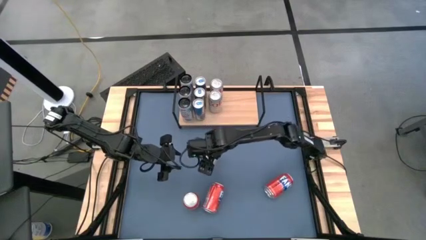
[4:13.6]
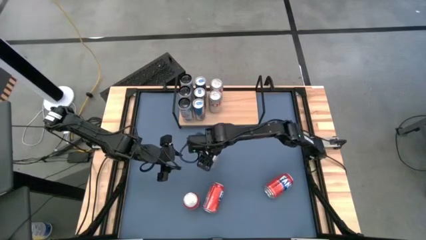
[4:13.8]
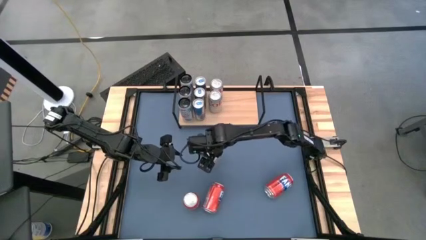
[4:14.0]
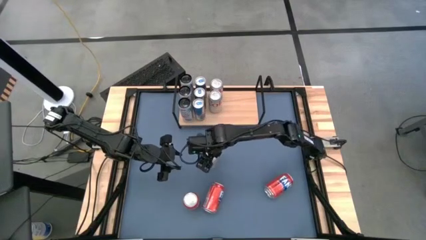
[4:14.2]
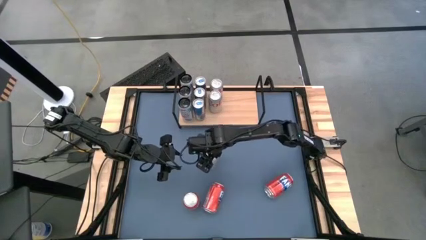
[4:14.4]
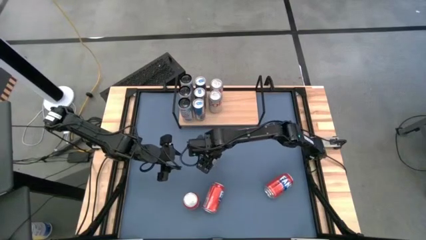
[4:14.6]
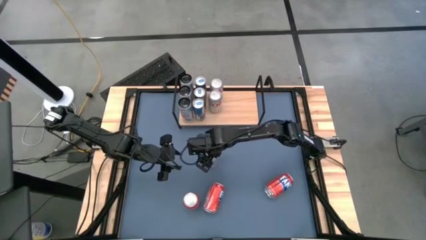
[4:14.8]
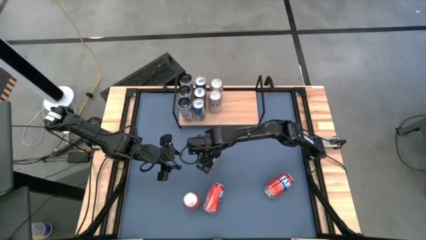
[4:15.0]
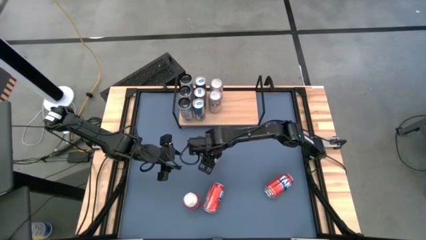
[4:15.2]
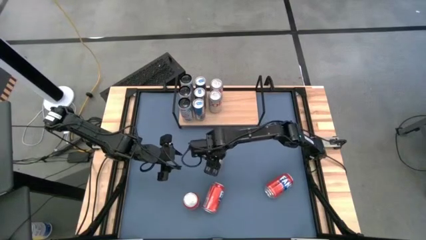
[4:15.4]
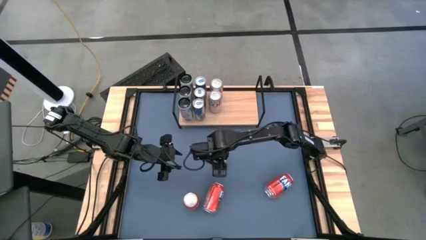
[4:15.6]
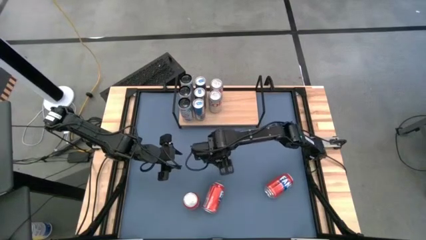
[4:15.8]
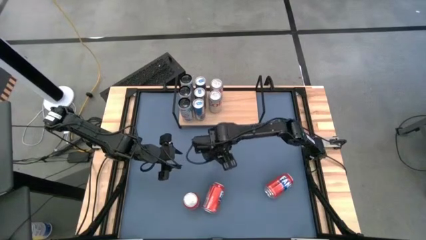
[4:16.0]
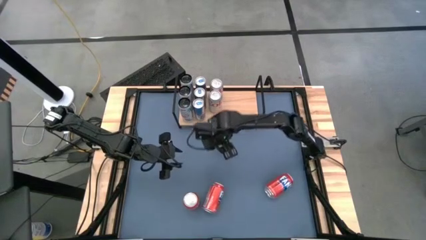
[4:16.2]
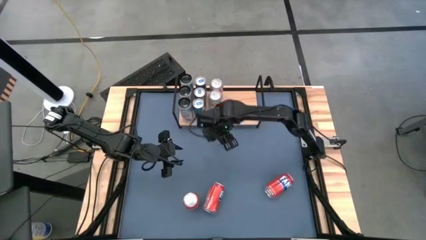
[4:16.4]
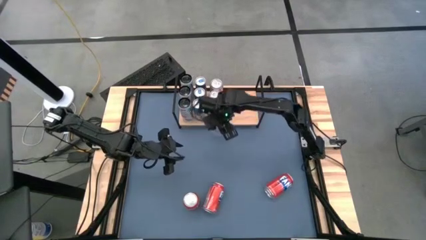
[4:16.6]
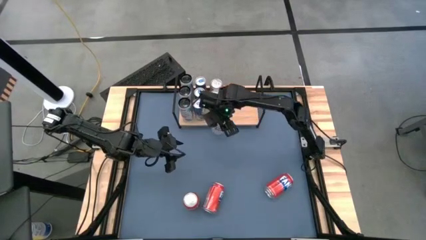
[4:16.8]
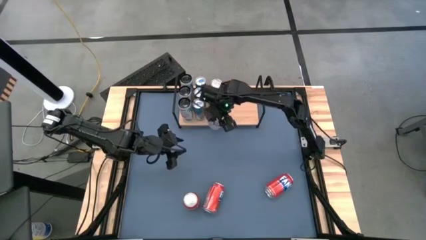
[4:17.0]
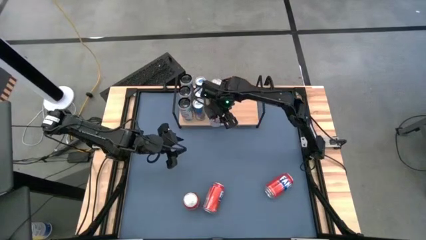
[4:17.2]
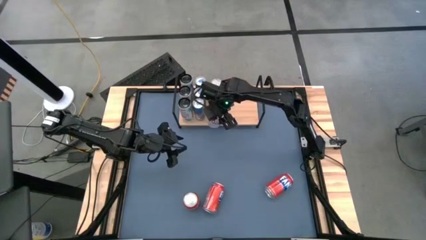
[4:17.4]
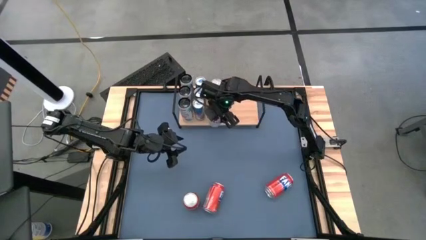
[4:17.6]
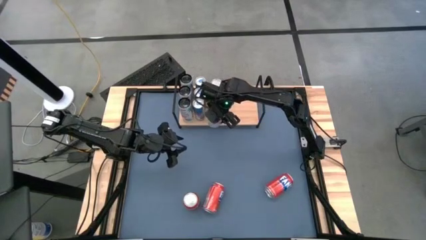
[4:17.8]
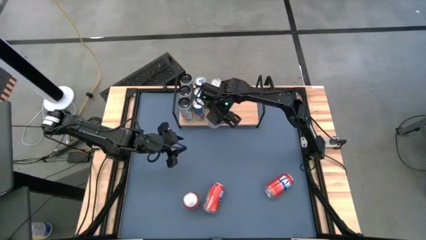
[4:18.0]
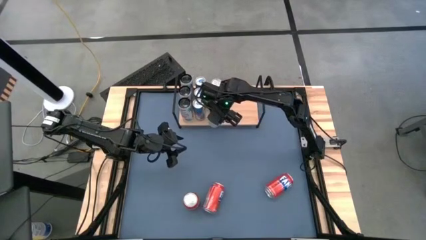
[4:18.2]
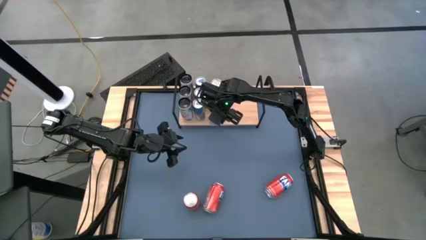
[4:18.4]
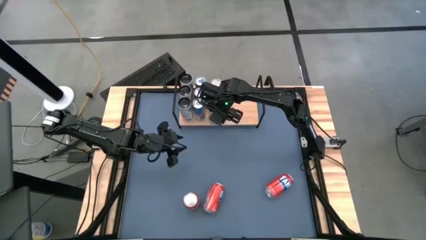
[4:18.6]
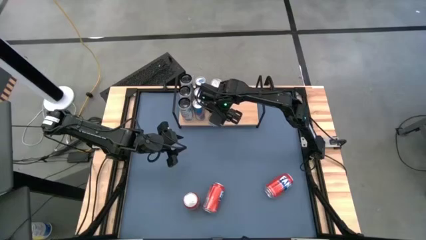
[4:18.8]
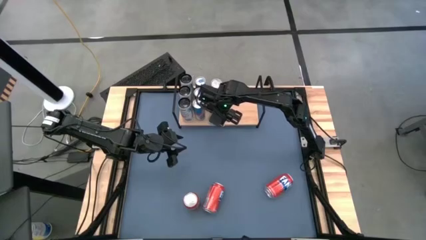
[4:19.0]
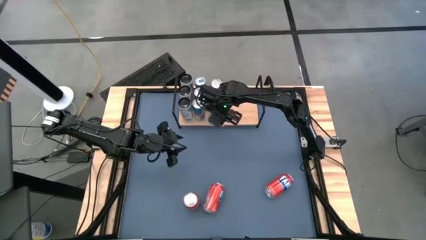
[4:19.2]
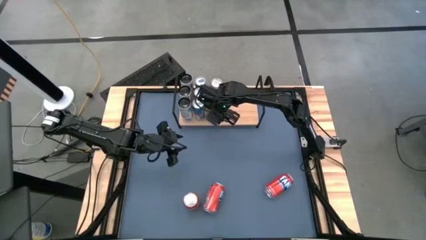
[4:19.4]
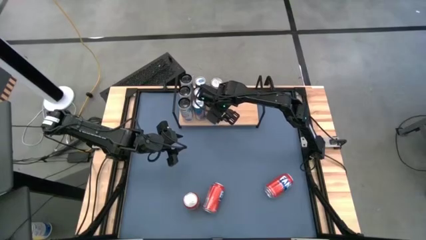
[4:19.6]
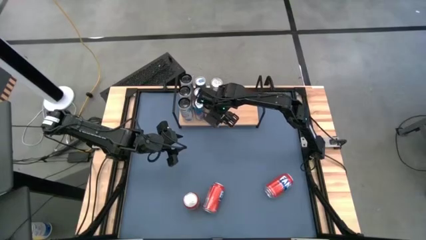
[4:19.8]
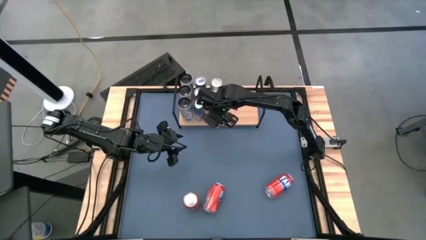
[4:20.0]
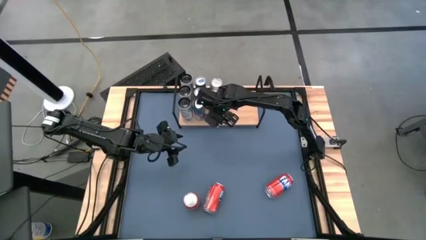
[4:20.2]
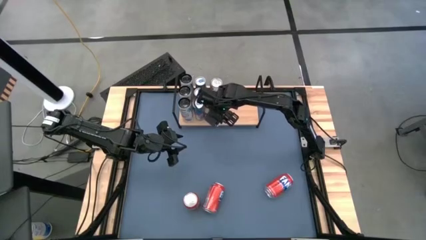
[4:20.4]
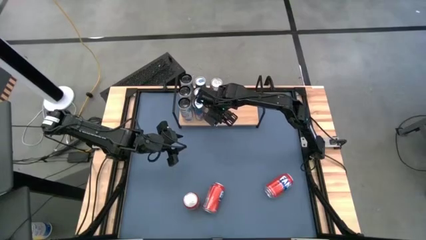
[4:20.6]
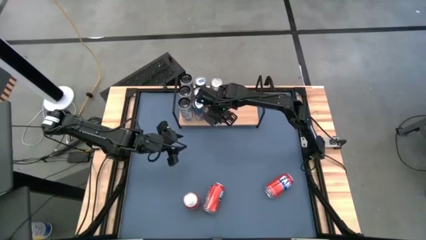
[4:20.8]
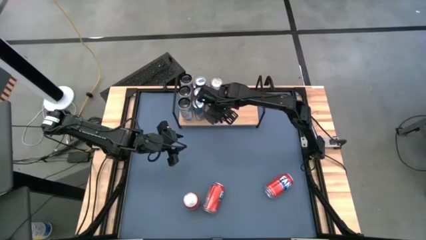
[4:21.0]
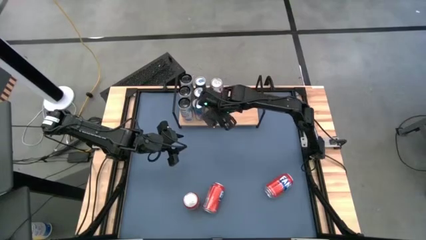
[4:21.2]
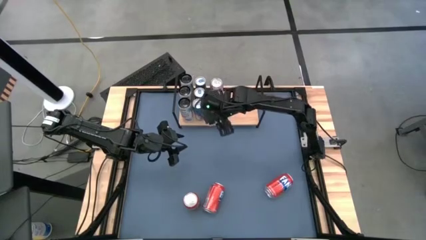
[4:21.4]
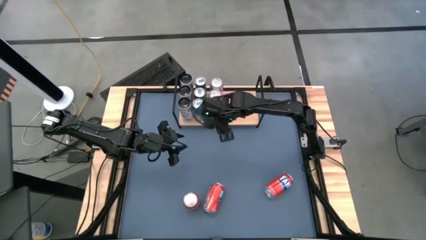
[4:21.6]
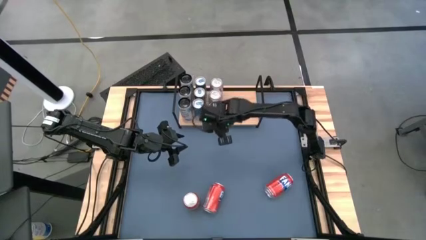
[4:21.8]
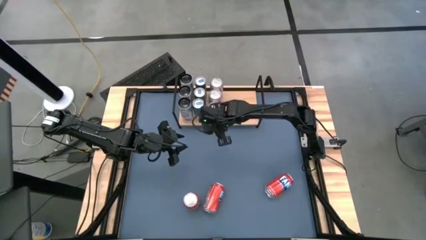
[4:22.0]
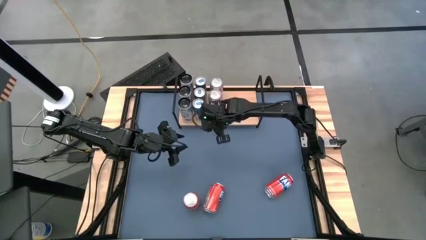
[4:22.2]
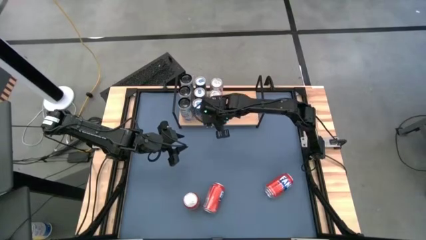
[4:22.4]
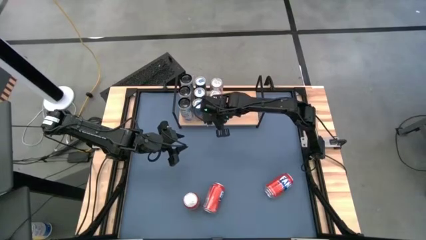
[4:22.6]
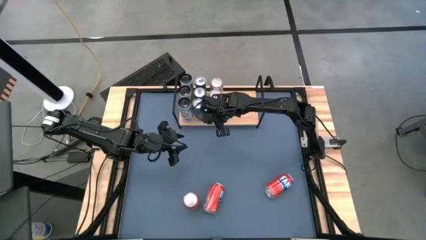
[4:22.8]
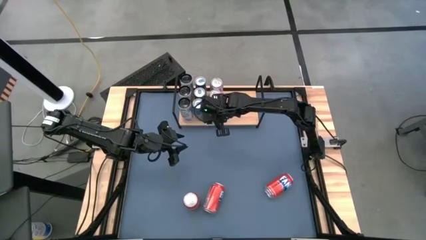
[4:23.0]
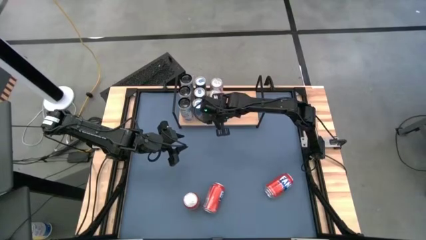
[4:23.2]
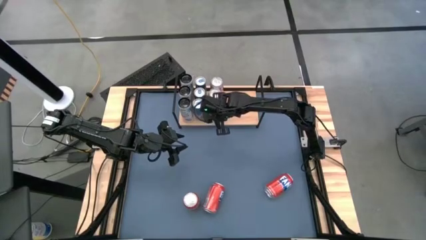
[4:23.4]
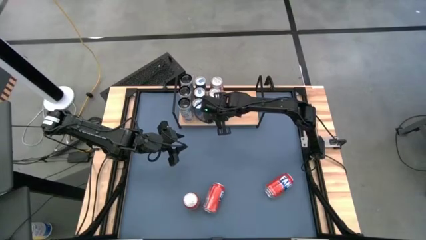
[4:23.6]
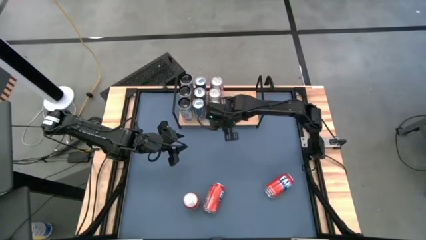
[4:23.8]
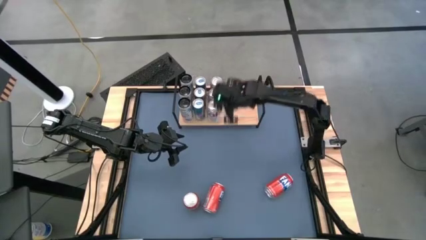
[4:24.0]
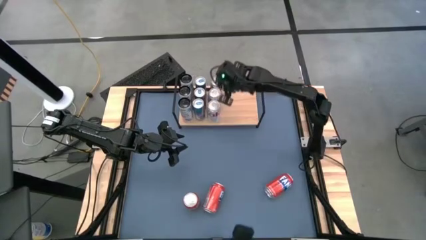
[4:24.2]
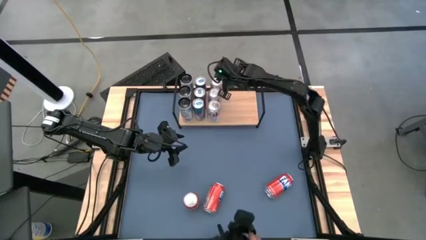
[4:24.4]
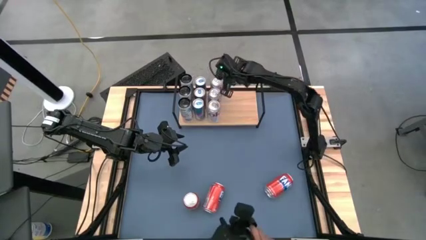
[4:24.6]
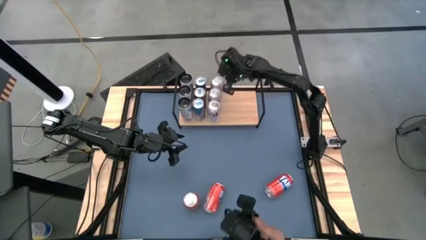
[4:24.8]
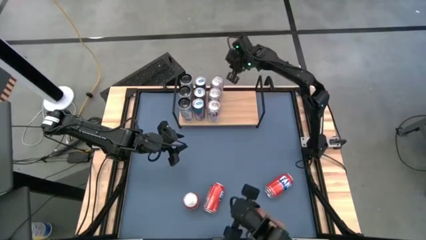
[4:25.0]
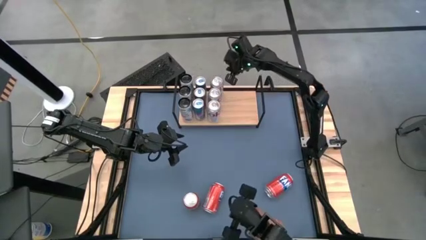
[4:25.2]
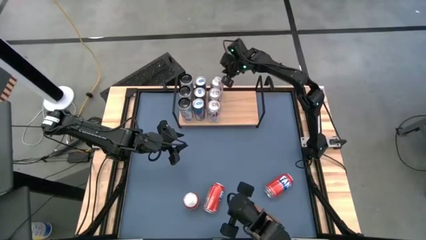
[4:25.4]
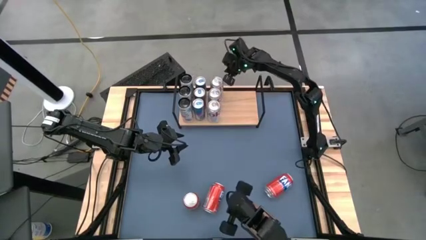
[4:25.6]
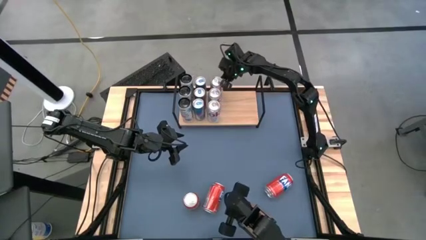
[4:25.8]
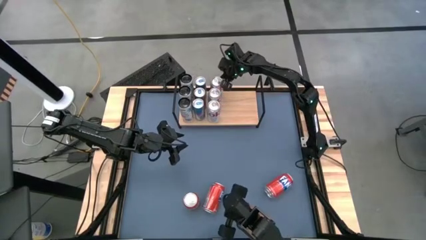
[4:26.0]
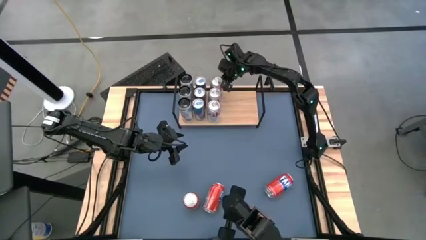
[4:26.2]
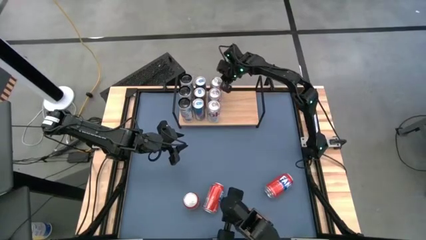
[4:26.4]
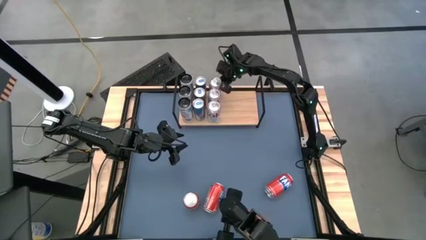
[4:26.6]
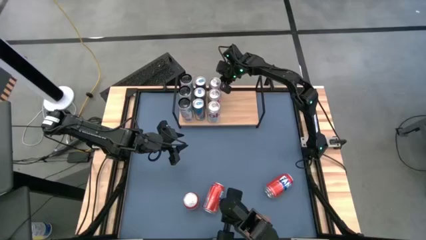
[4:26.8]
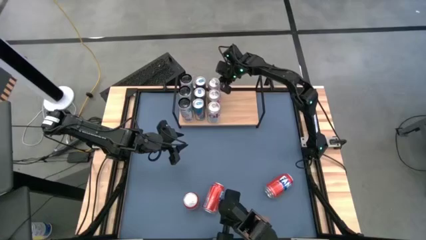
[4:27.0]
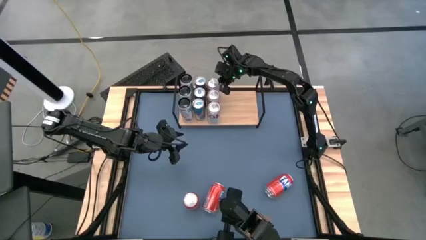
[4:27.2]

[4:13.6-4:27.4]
Task: Place canned beverage on shelf
Put the silver soda can aligned with the other silver soda cans on the shelf

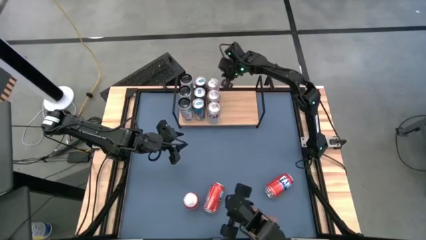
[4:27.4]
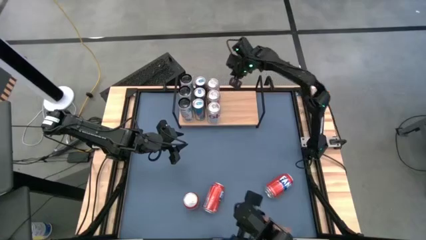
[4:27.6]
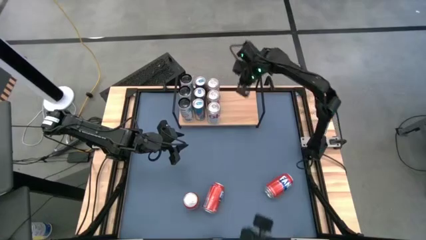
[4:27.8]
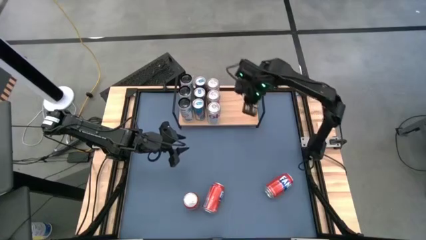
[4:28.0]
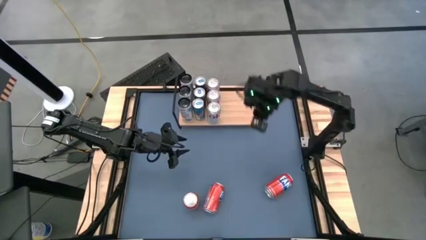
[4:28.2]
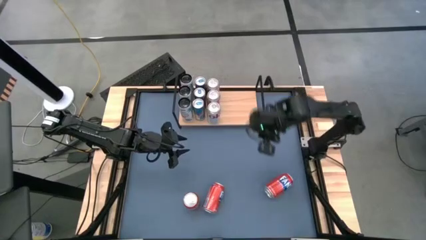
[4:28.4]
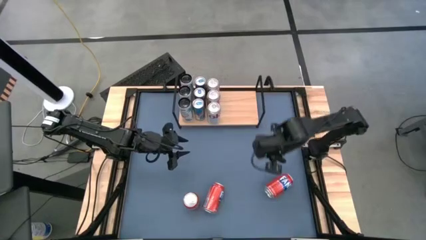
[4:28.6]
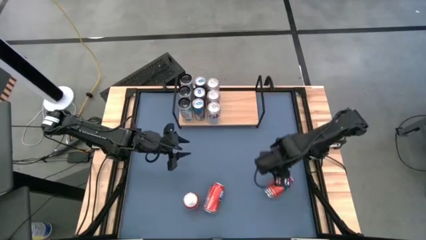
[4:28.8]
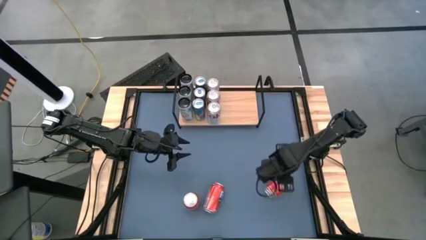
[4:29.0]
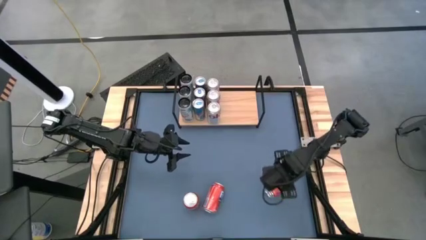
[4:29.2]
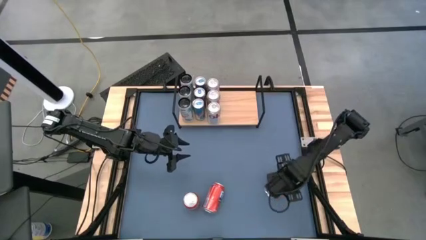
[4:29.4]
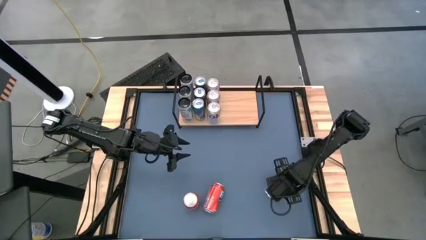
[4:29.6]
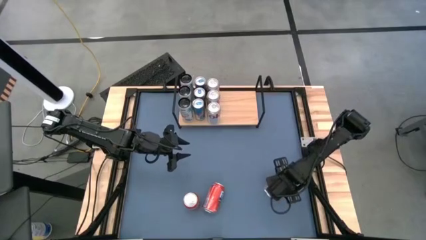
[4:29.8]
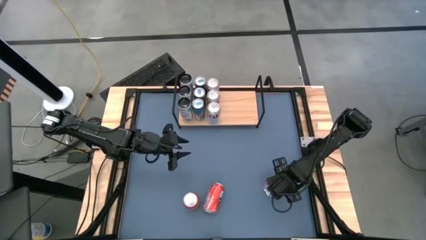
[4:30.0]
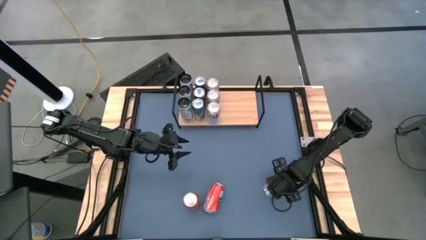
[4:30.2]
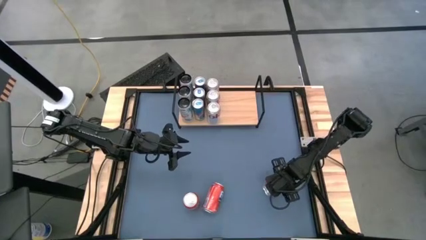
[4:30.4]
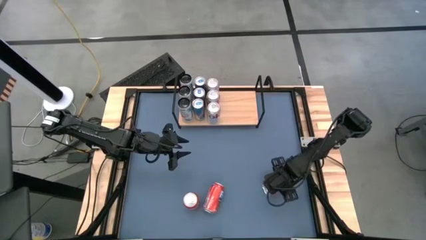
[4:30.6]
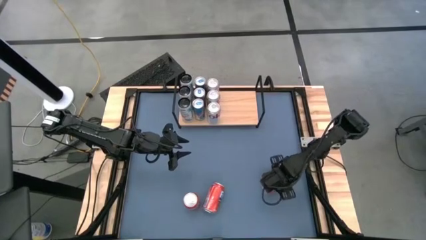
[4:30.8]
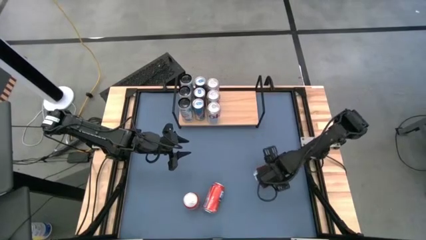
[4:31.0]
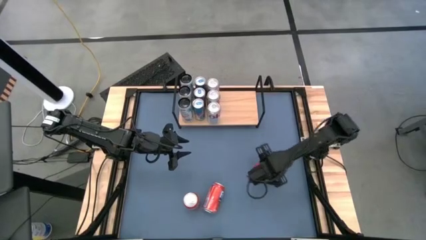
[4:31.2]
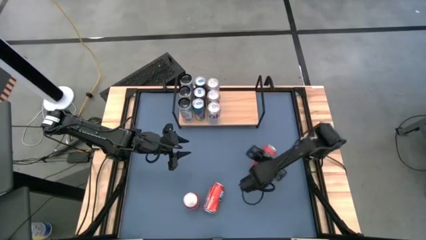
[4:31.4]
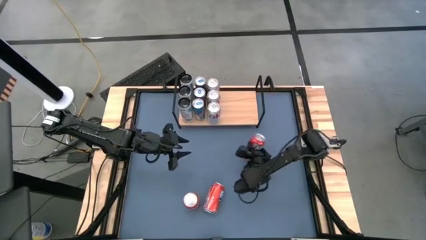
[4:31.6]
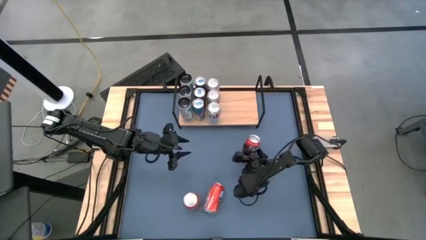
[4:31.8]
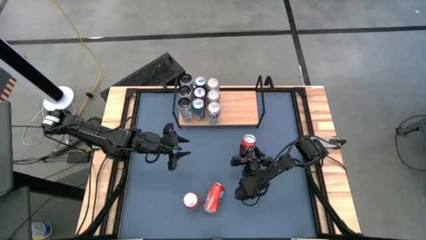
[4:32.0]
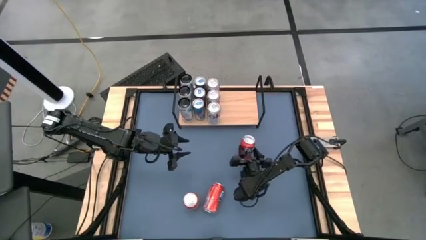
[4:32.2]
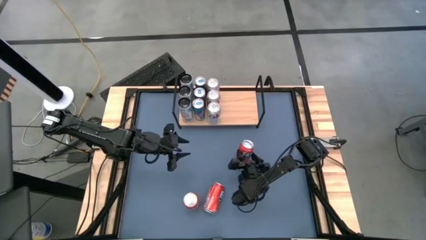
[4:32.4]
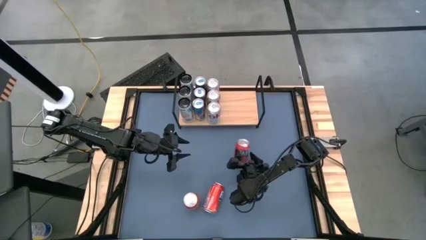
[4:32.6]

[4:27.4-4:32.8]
Put the top red soda can on the shelf
